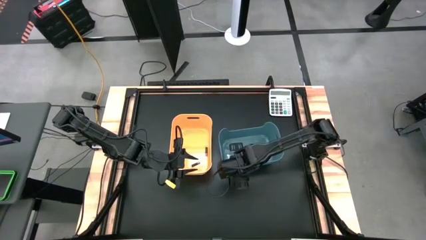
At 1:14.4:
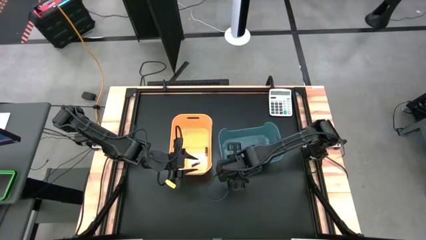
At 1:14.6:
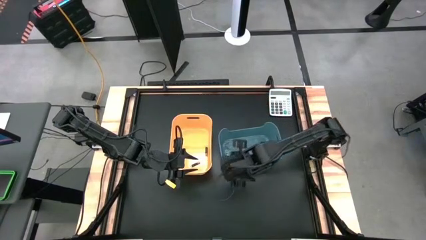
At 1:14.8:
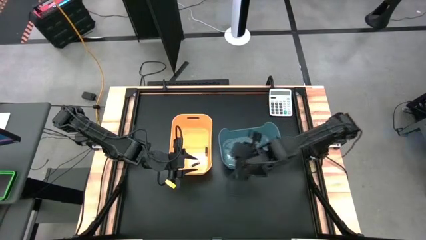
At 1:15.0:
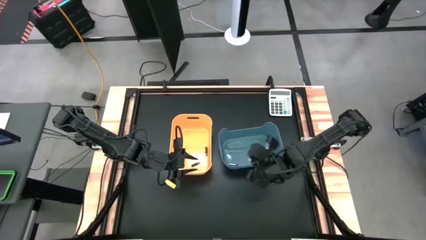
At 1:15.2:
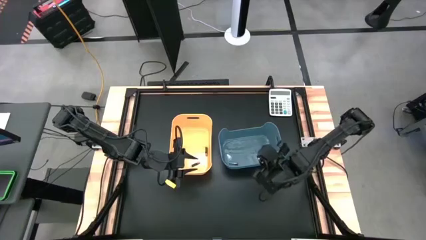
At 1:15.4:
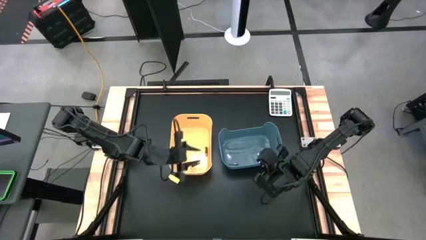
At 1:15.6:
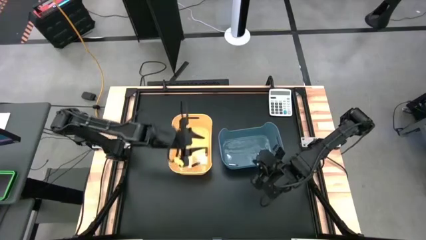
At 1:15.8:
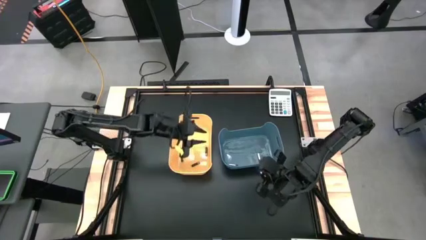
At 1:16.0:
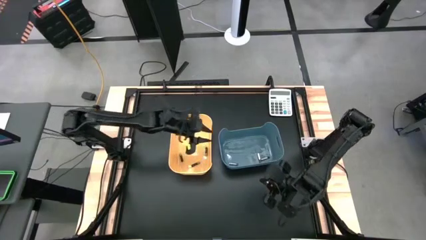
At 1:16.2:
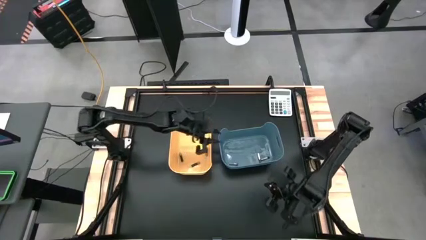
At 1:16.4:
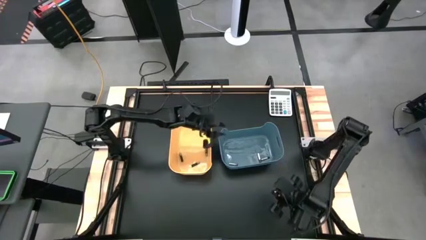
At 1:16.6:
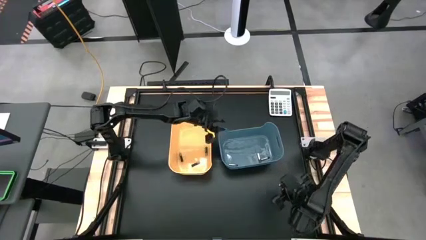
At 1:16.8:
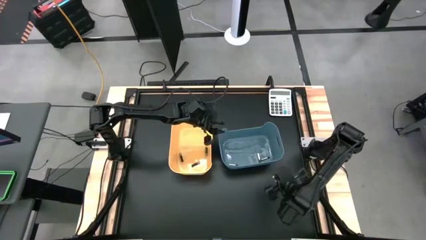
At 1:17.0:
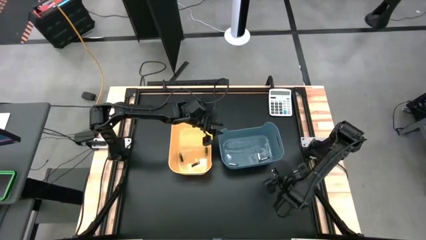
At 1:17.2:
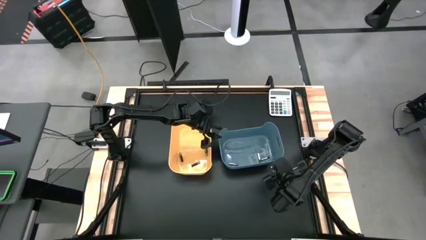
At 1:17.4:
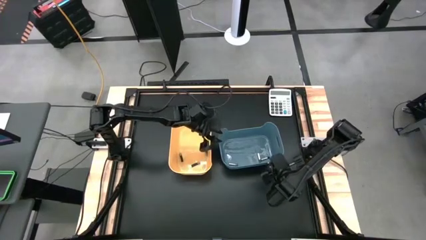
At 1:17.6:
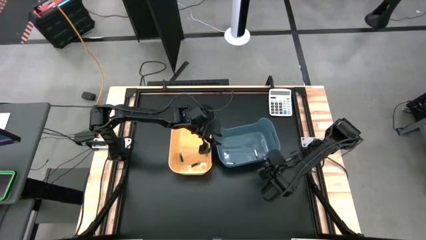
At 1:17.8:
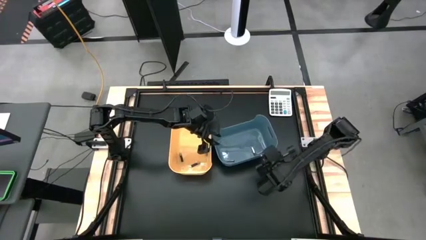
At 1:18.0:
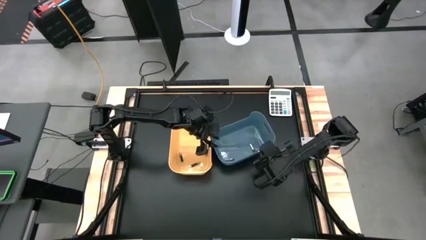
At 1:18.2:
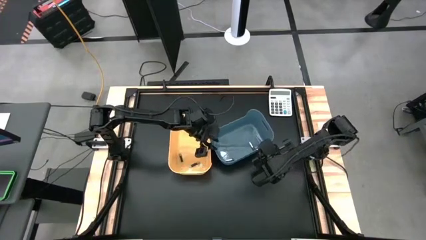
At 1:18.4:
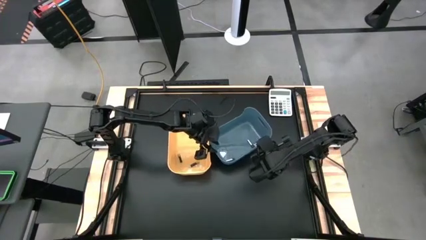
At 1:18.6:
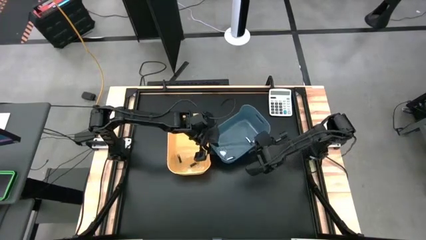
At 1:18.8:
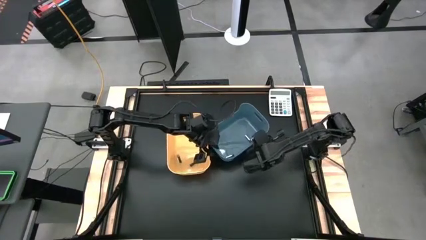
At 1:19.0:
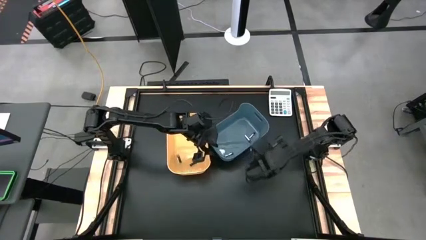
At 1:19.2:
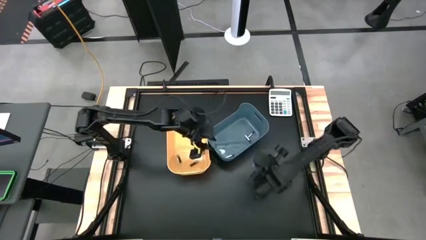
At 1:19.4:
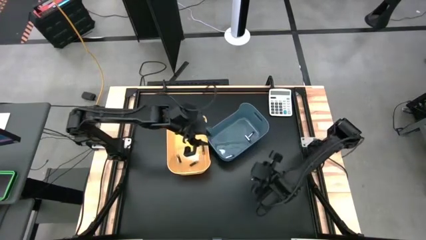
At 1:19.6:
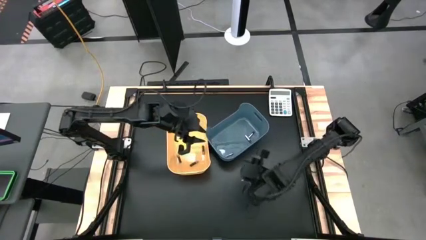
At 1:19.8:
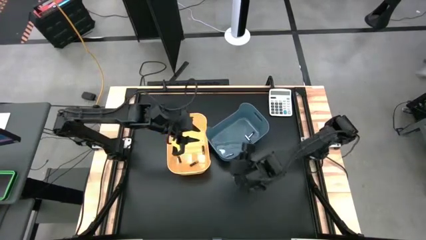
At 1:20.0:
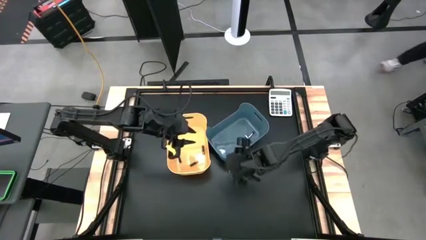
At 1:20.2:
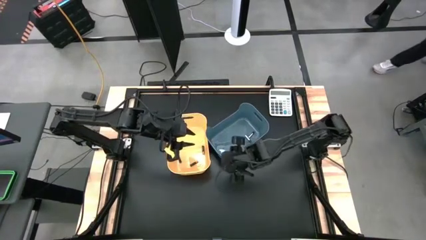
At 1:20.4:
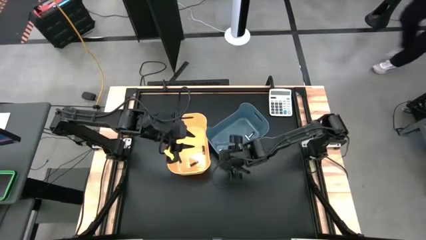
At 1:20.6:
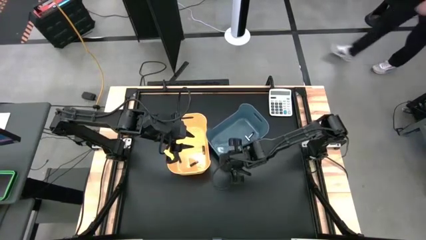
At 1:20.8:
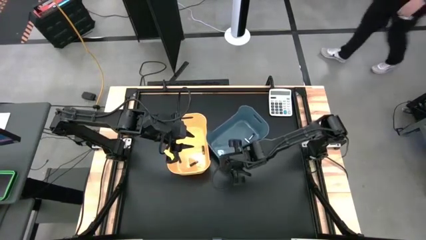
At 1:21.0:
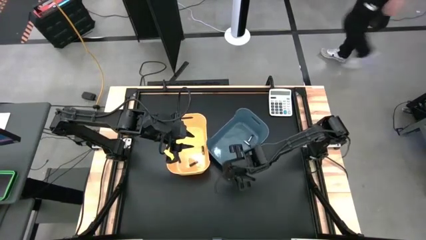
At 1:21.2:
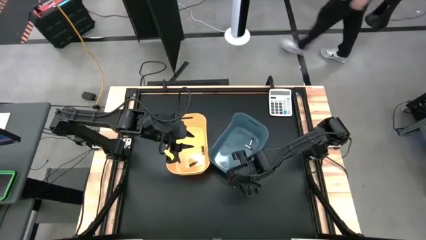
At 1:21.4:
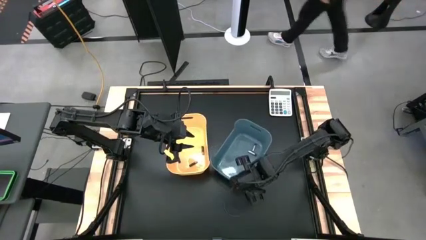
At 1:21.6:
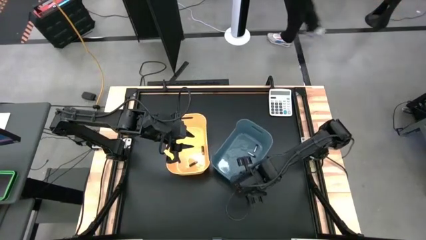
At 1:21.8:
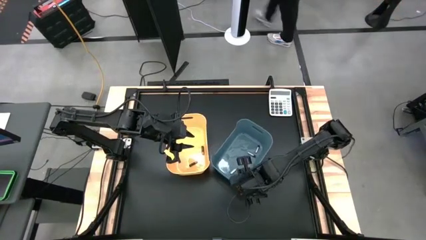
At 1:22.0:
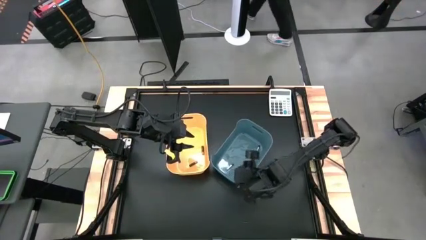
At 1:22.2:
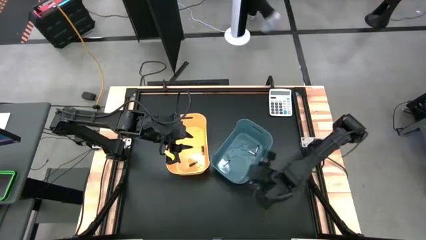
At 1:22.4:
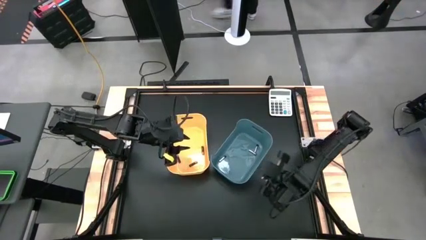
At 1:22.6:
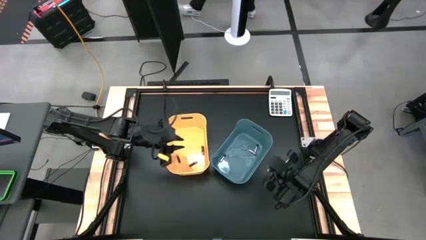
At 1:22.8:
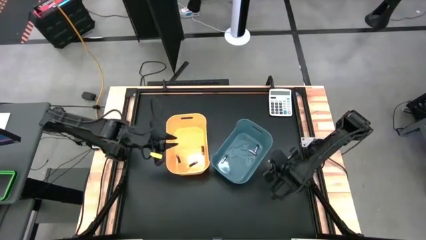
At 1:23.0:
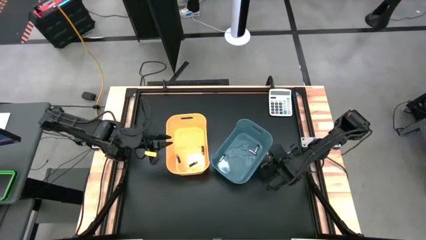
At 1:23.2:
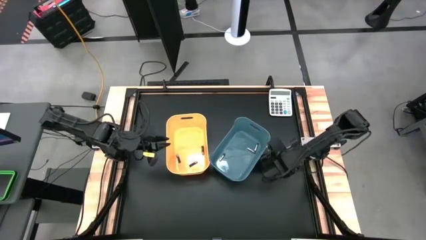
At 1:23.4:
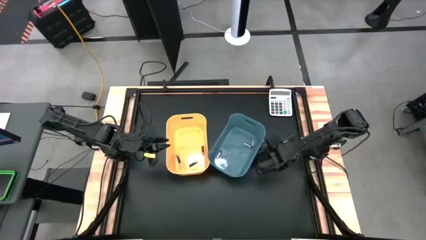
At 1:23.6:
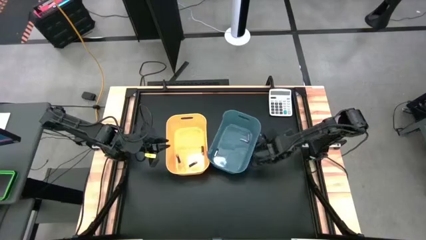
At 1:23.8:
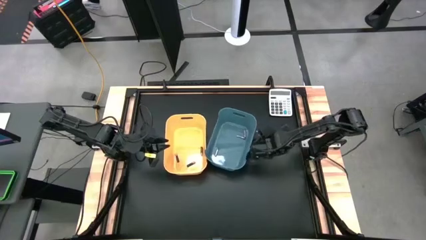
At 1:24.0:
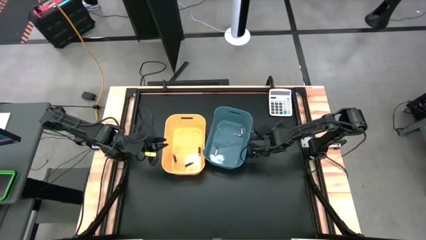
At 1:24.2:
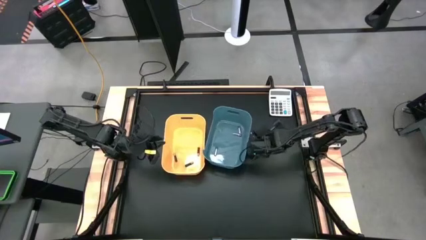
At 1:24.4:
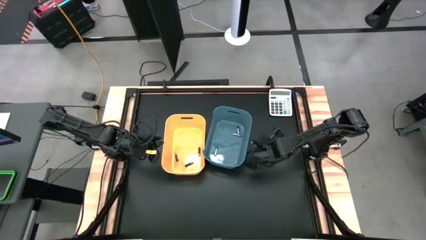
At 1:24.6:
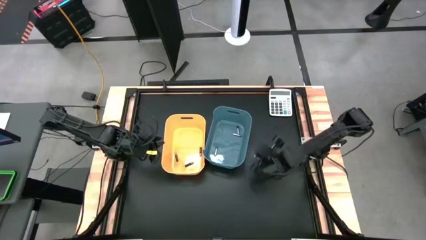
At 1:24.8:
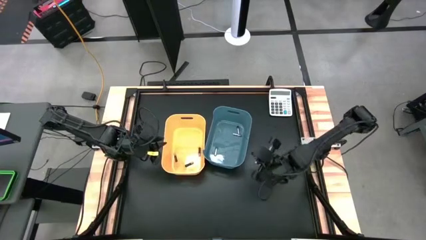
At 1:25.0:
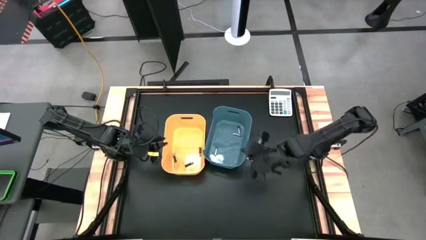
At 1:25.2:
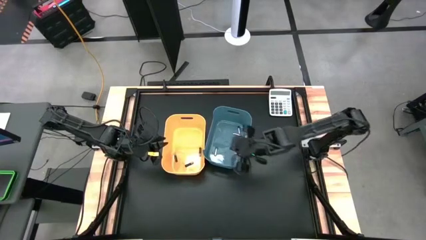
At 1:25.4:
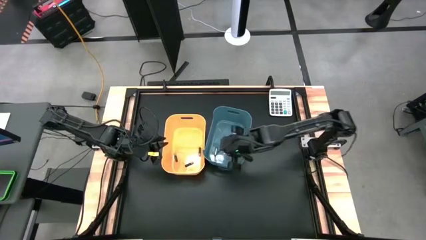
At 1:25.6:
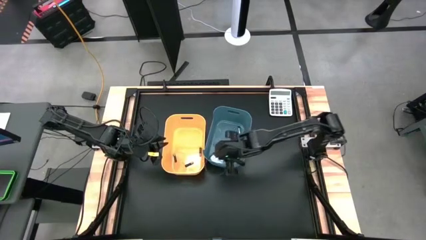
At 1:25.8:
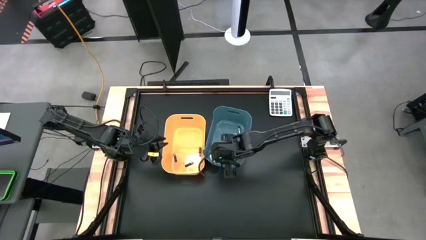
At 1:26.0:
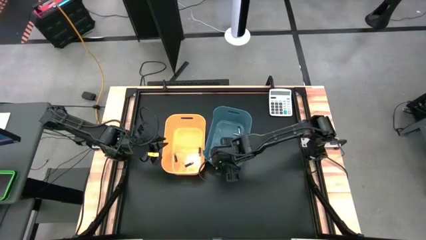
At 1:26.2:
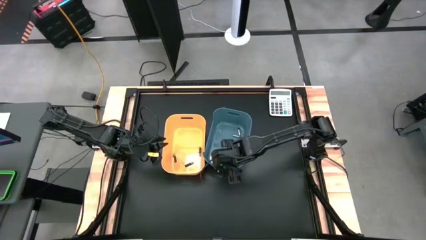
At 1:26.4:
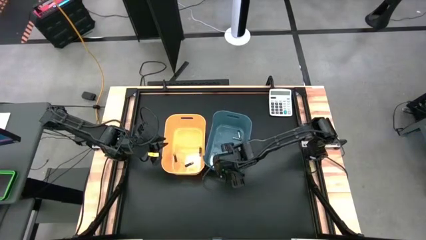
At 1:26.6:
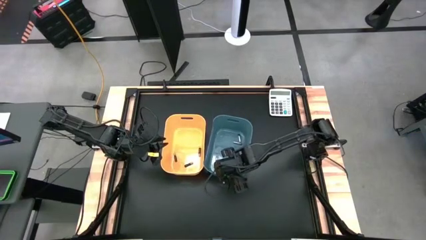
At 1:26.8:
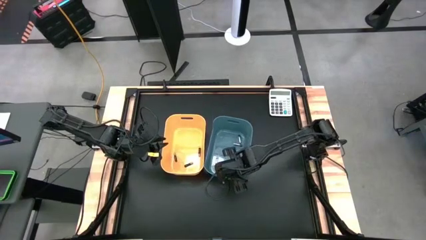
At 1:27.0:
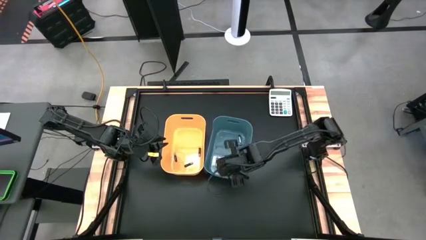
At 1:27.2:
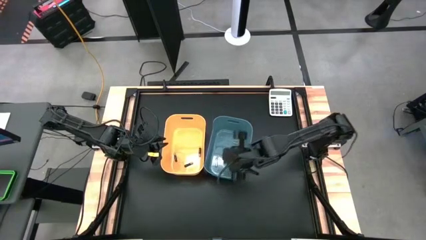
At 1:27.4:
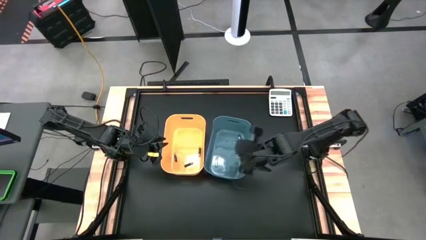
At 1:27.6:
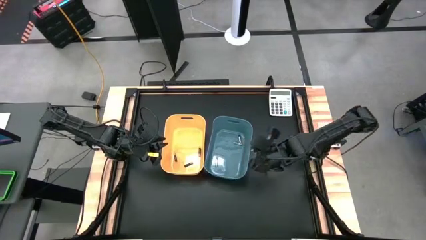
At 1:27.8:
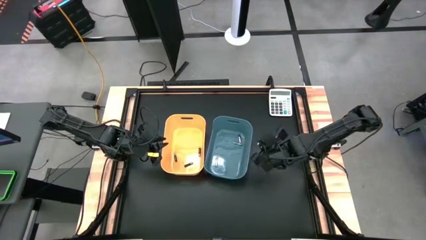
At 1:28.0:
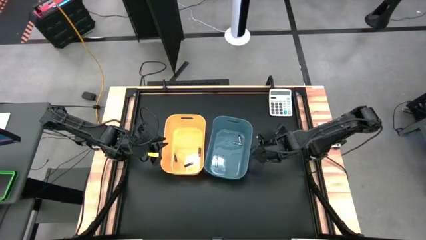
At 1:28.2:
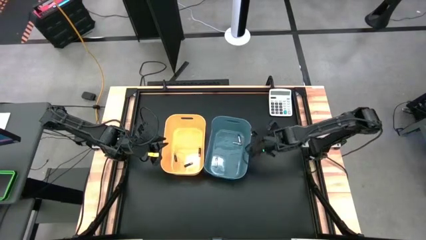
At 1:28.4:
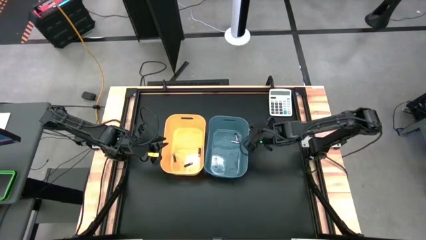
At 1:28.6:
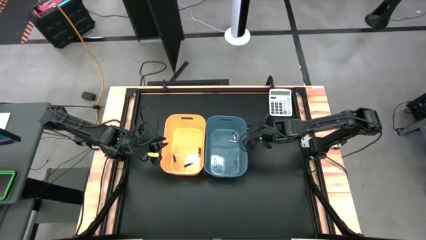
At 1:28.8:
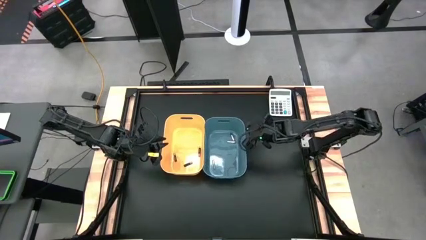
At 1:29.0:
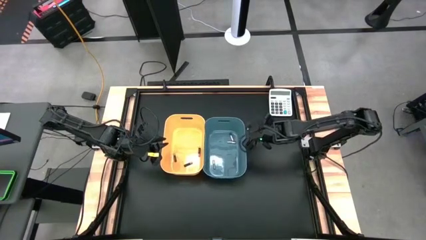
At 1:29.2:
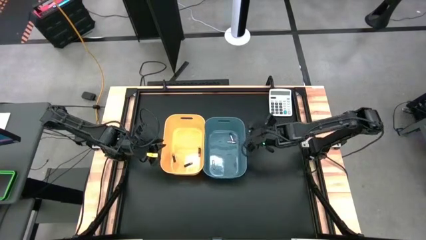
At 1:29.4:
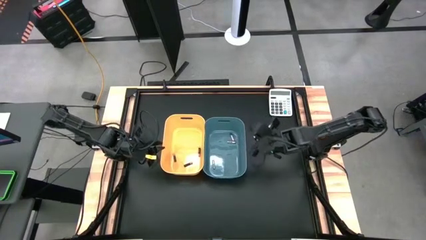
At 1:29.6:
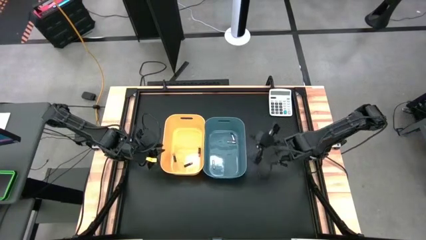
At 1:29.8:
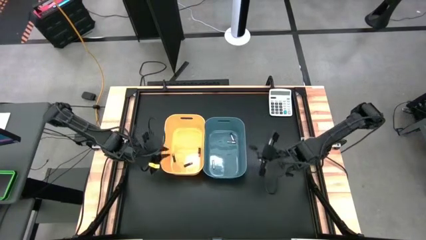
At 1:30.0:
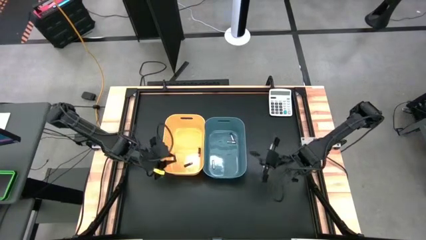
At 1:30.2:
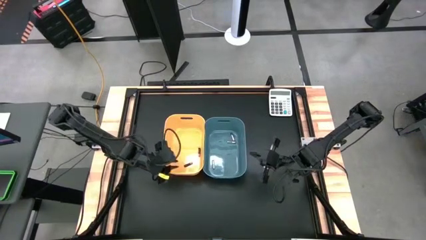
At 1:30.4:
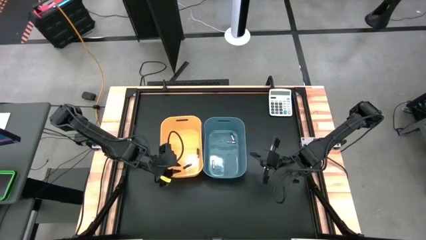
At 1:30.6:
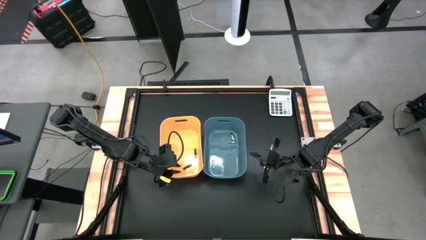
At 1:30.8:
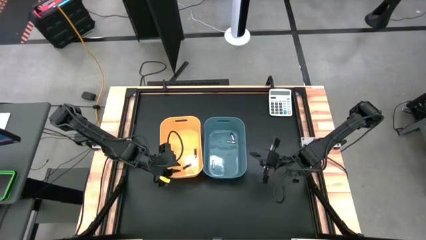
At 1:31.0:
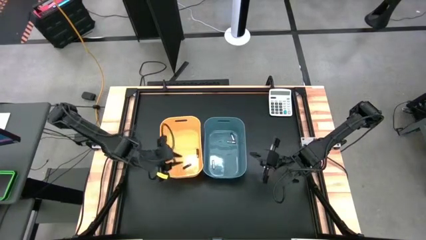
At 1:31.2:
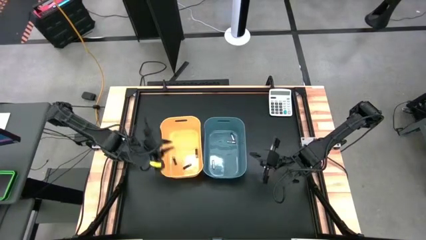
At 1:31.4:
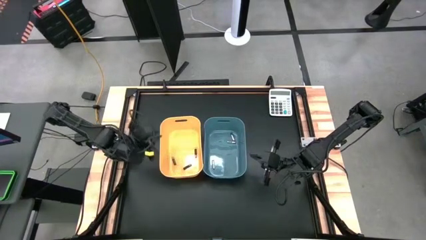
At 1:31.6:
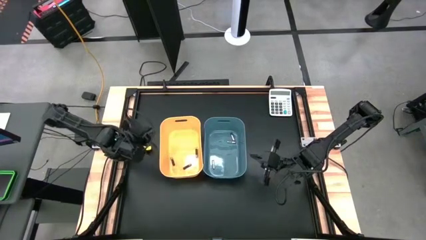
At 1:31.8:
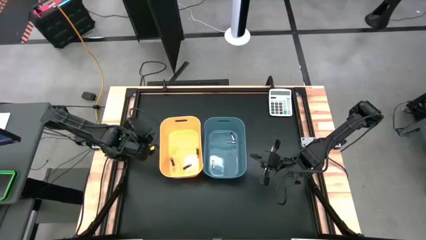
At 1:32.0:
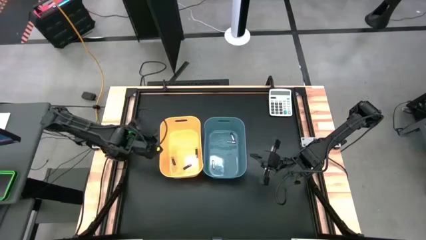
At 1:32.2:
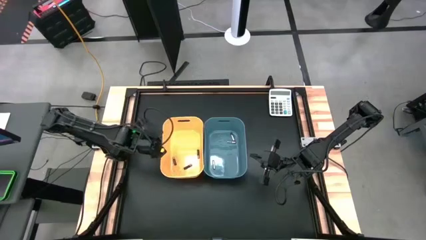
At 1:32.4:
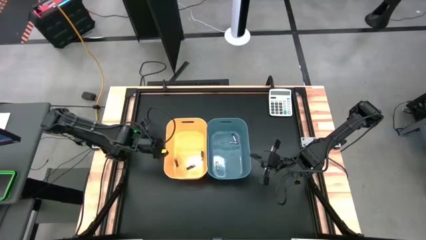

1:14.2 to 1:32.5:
Task: Sort batteries
Adjust the bins
